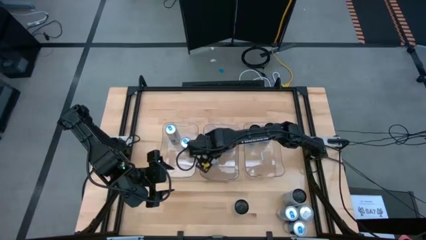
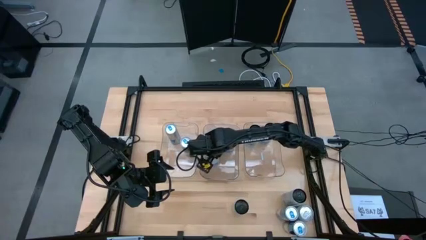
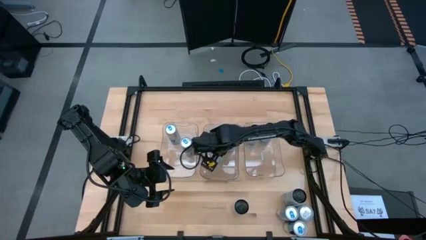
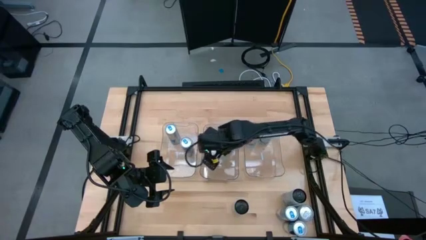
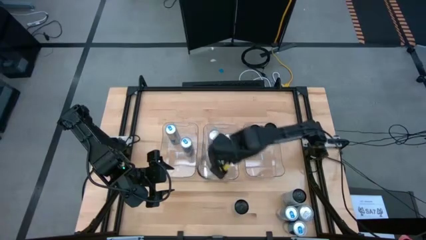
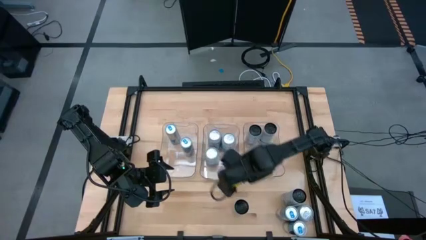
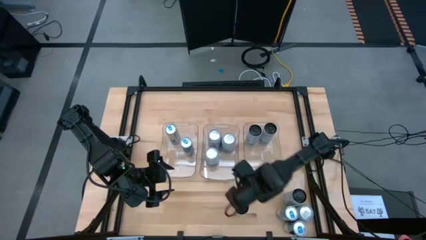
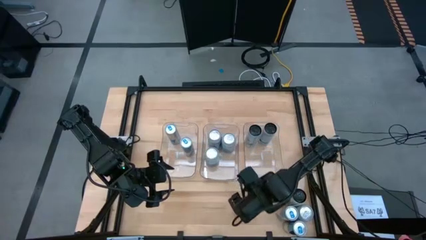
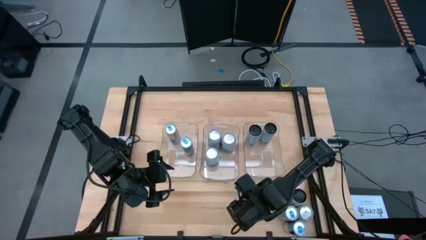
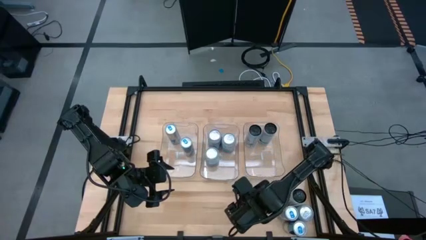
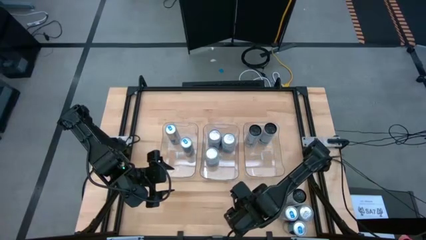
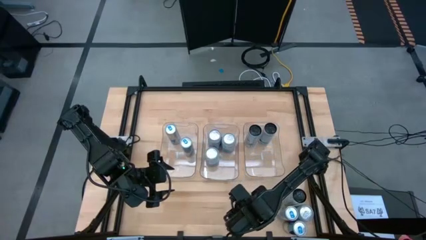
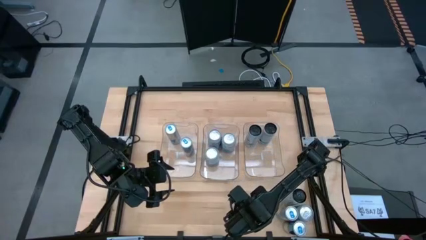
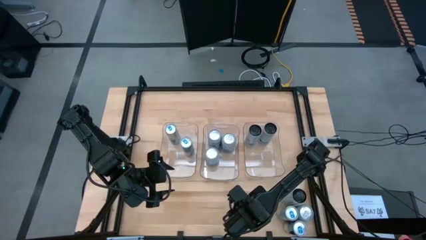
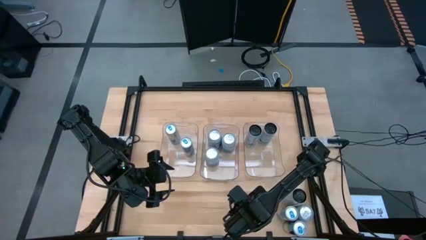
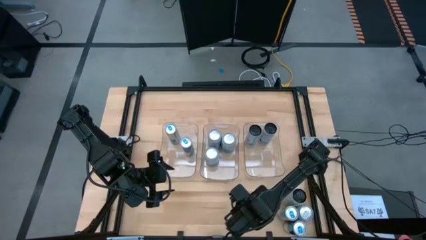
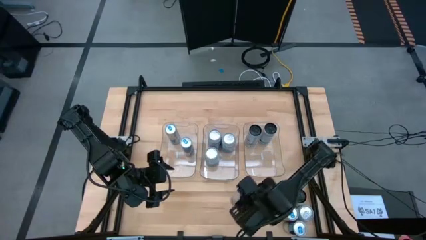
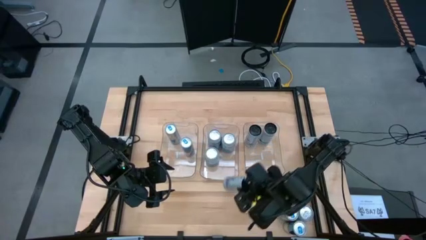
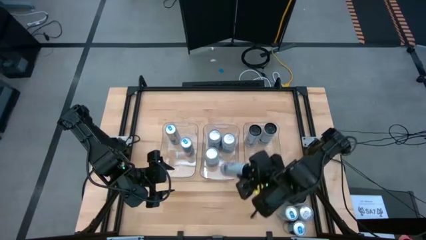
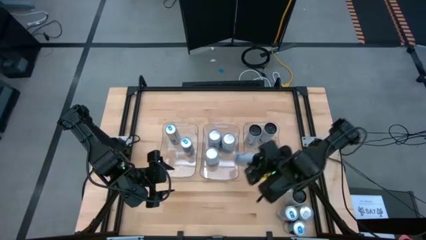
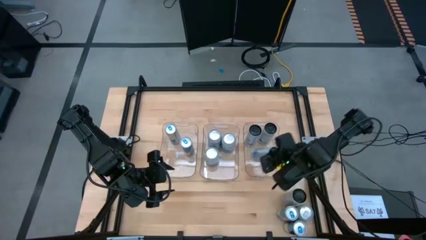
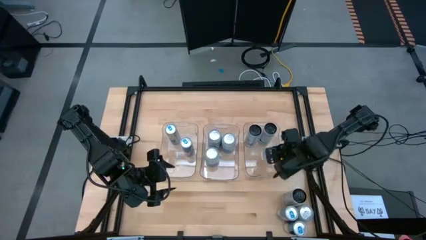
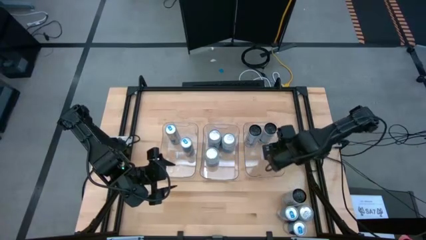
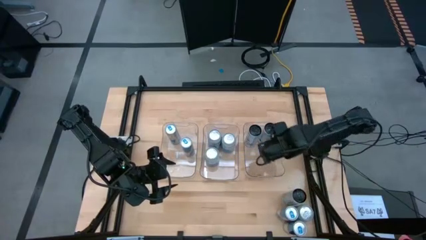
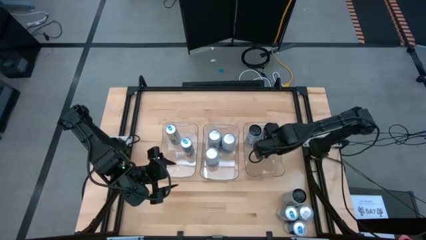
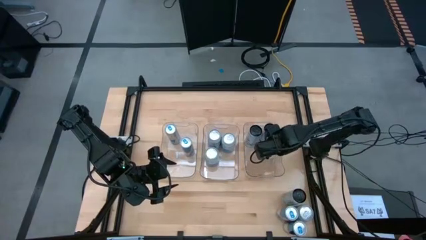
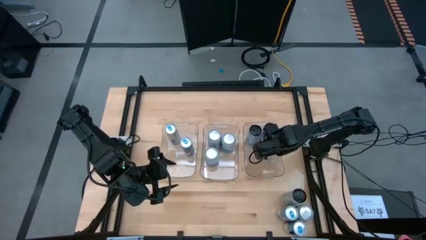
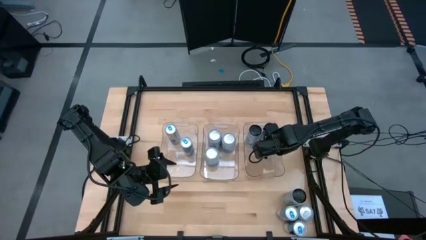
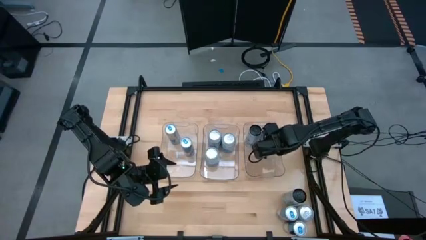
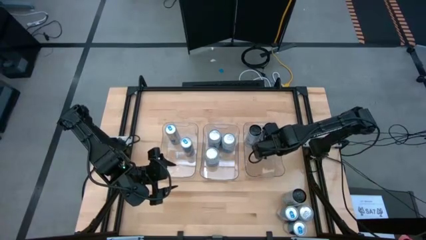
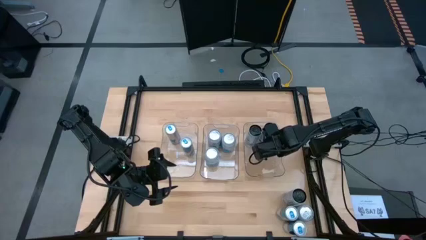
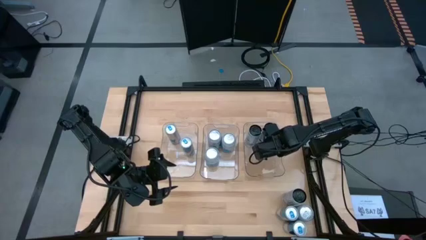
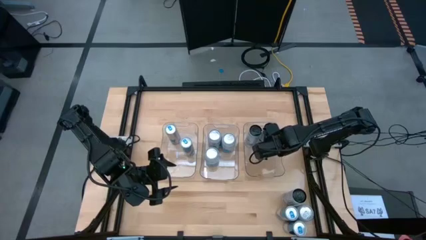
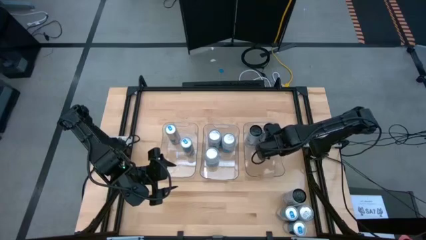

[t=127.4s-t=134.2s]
Task: Sort soda cans
Put the left white soda can into the right transparent bin

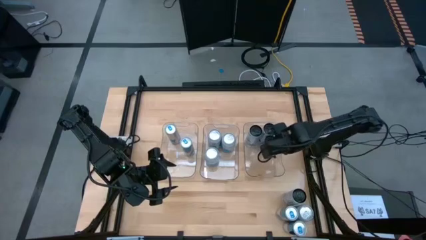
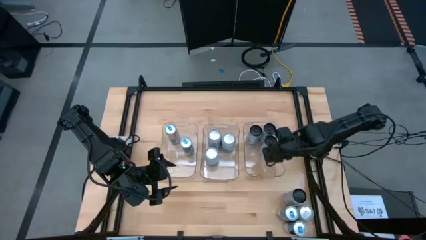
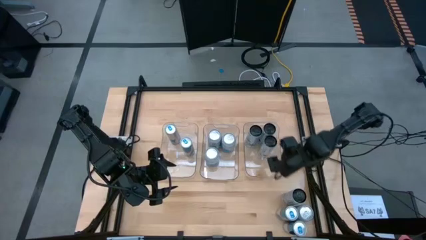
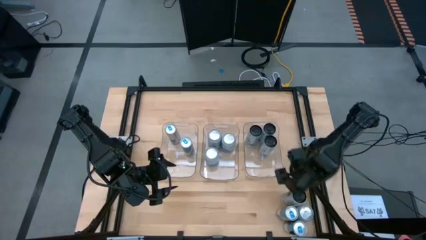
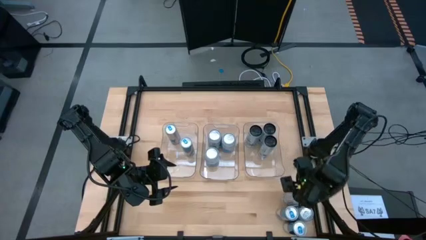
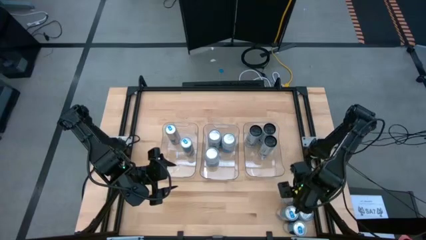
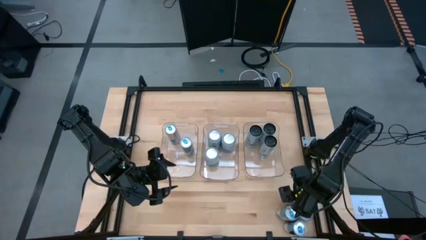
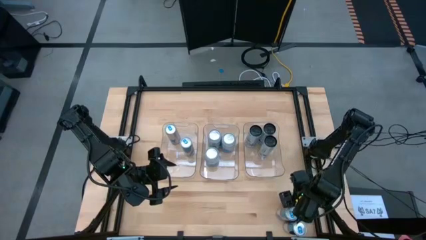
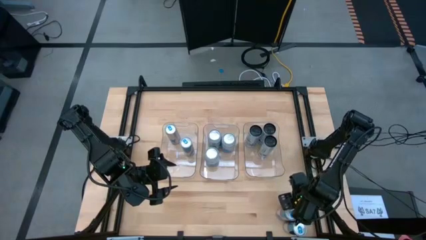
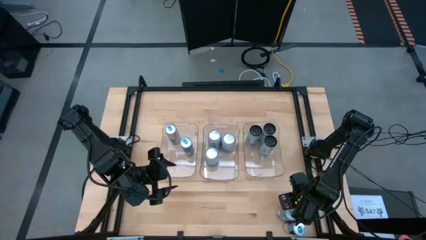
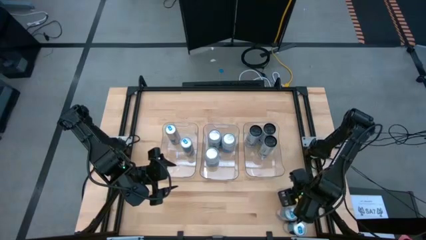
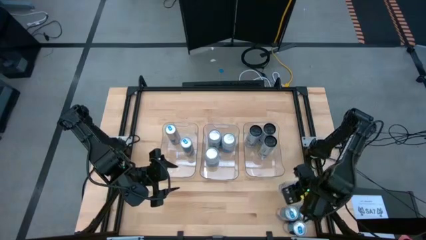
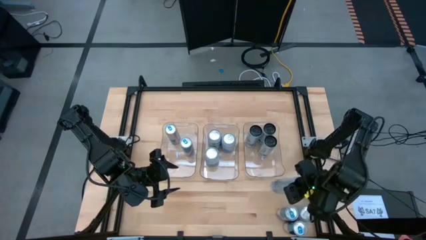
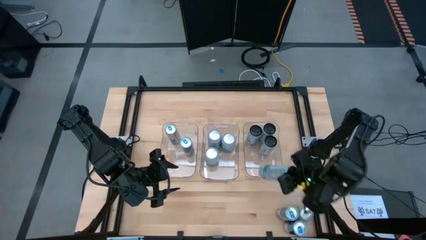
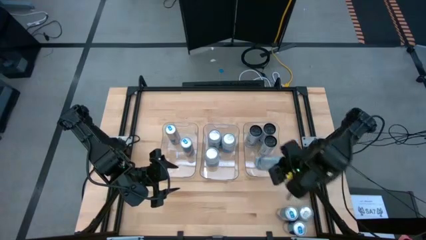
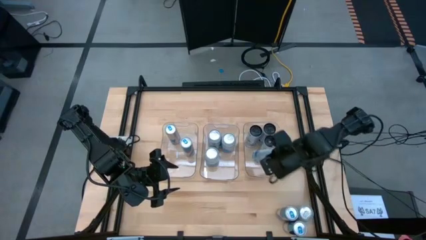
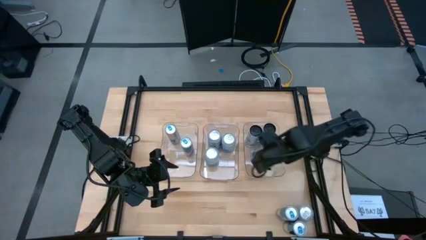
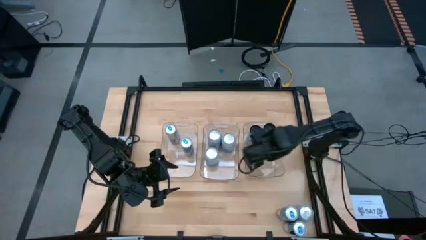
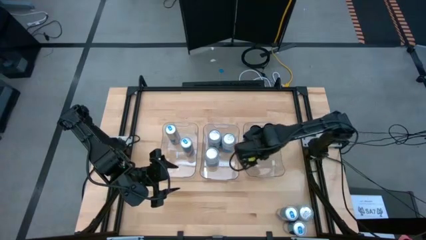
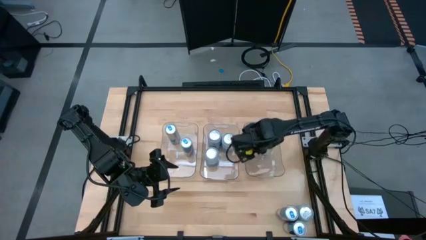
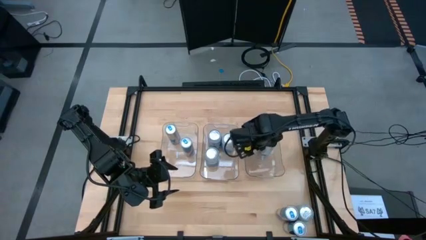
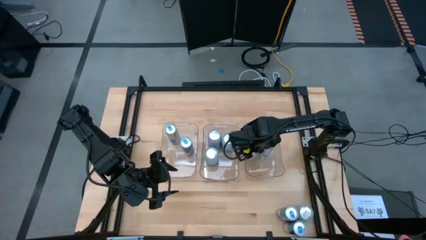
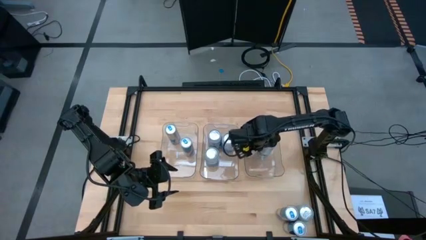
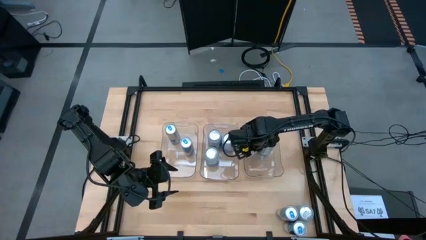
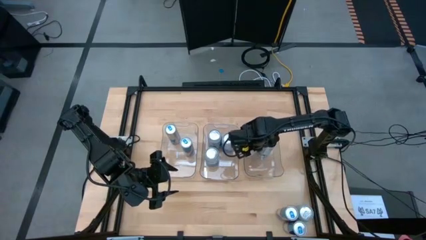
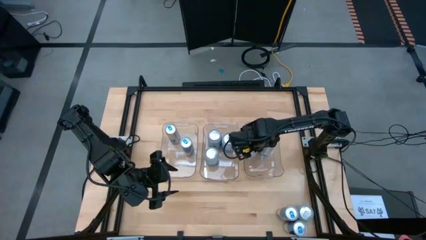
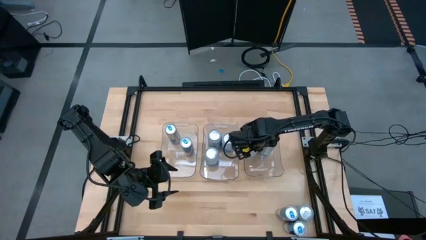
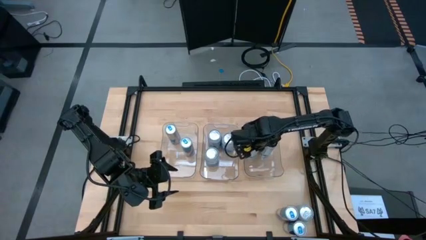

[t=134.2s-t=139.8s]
Put the white soda can into the right transparent bin

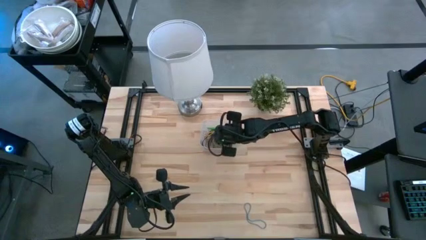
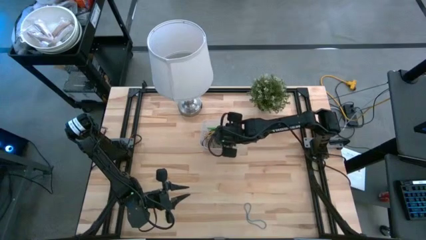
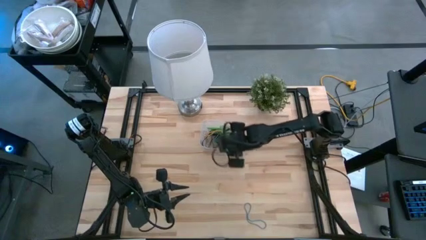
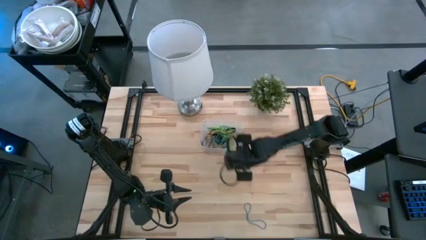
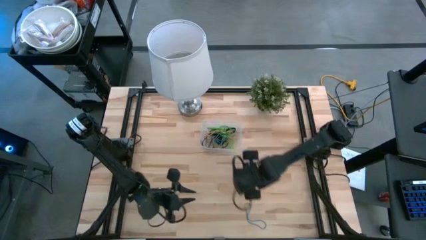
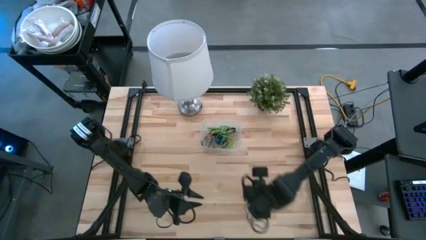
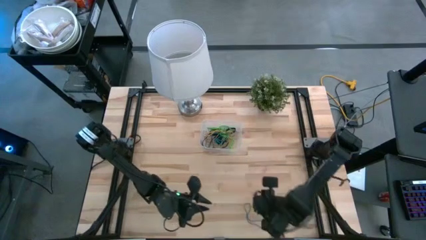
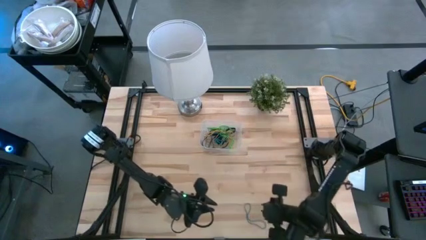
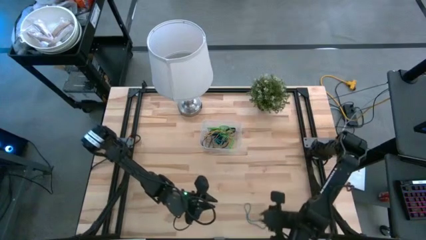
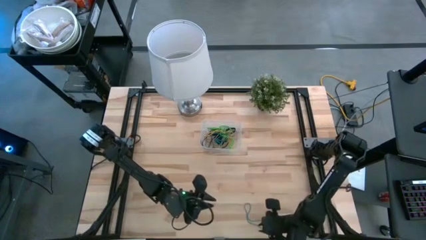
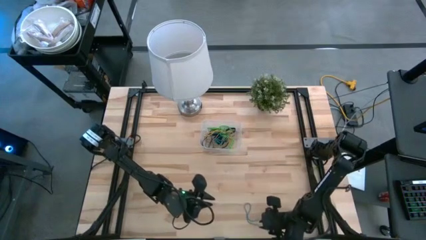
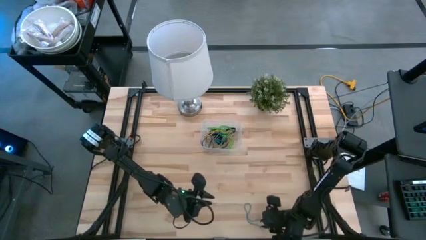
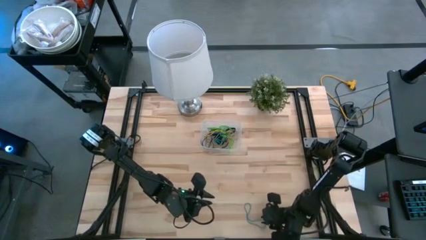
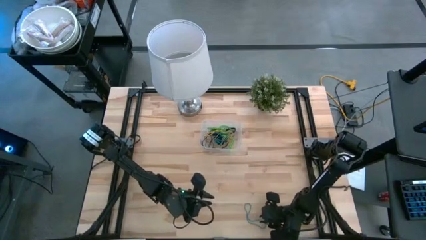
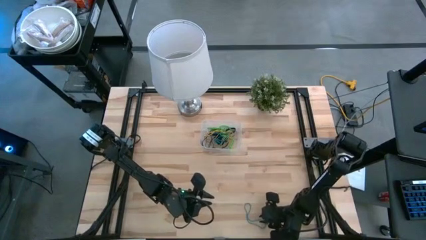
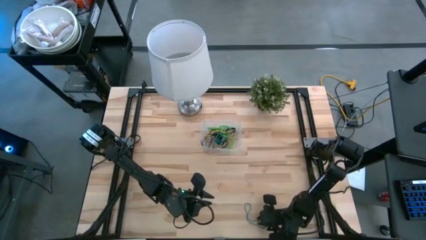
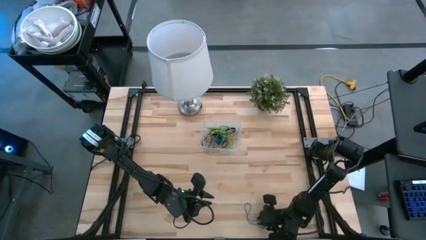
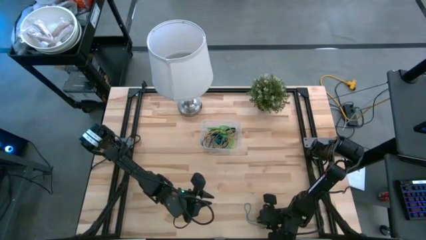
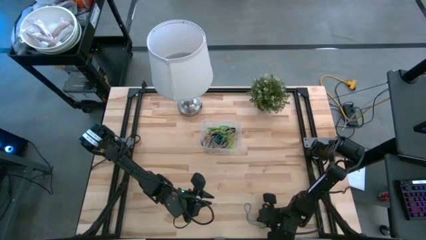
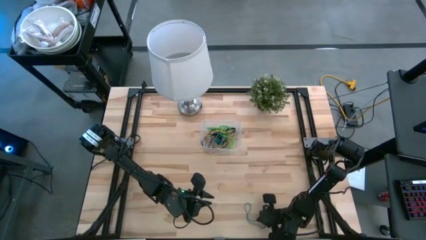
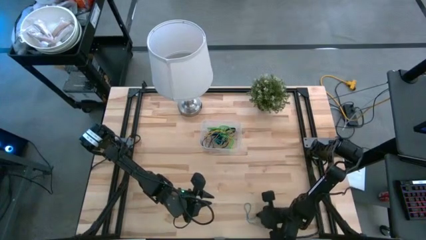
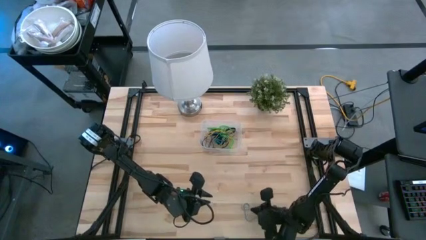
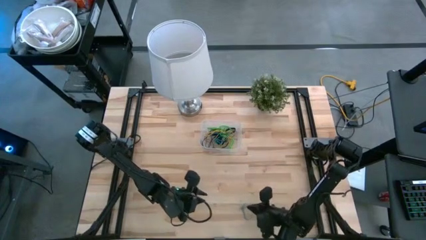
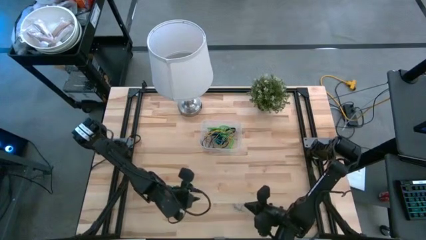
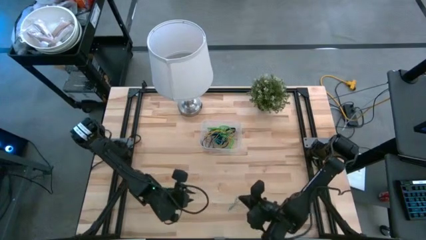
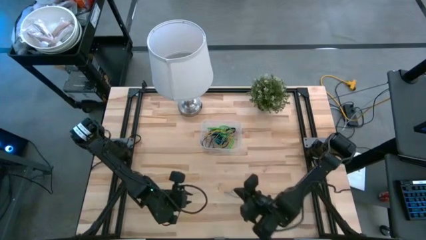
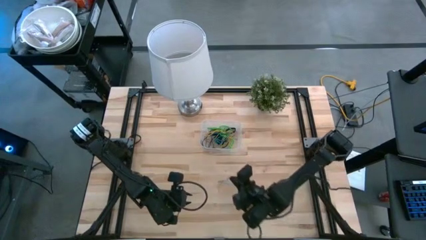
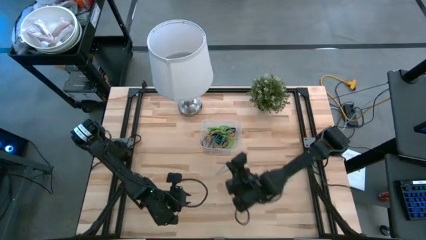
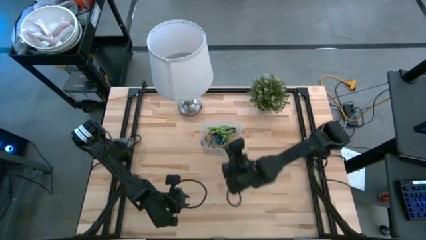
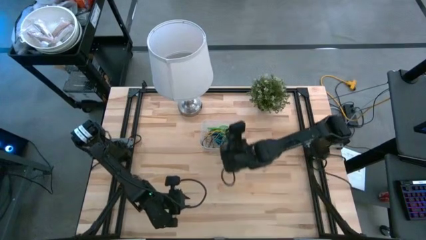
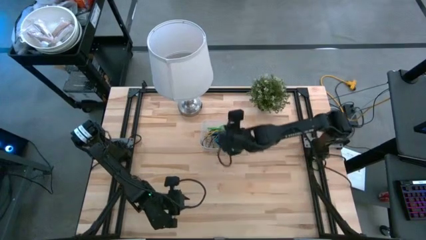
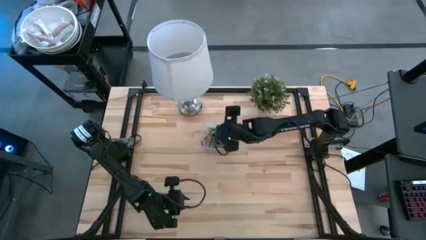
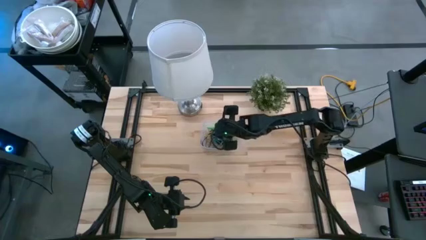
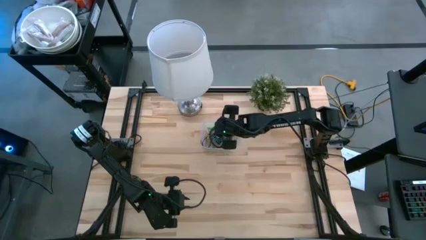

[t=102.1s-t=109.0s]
Task: Pick and place rubber bands into bin
Put the blue rubber band into the transparent bin
